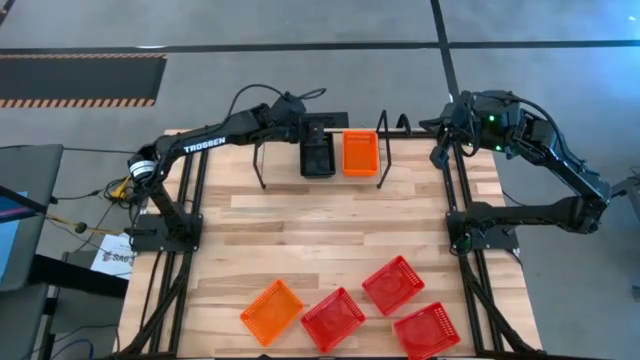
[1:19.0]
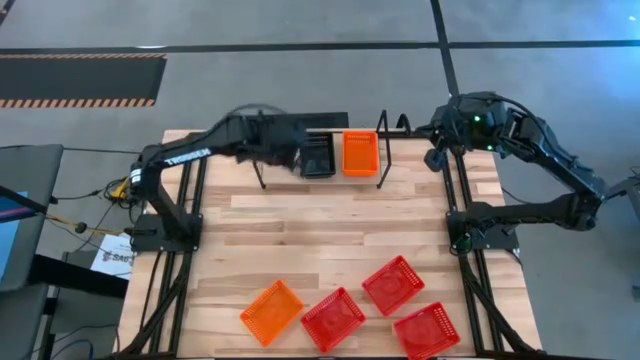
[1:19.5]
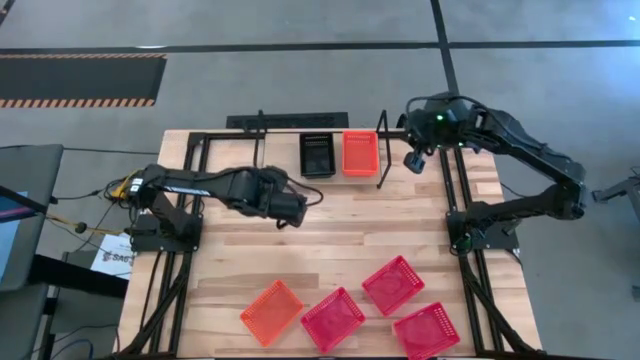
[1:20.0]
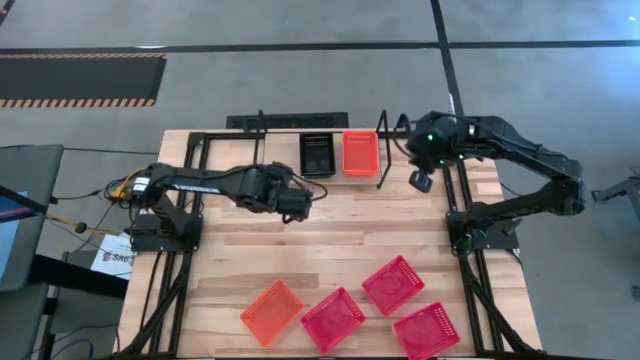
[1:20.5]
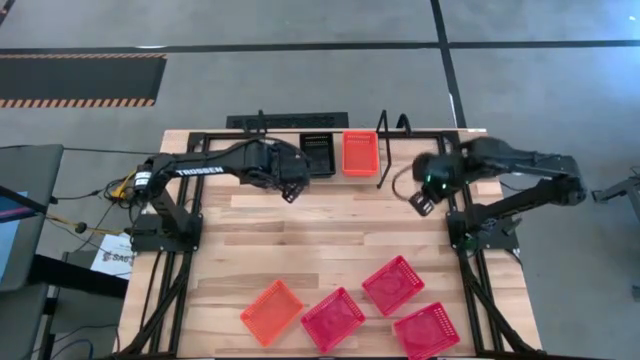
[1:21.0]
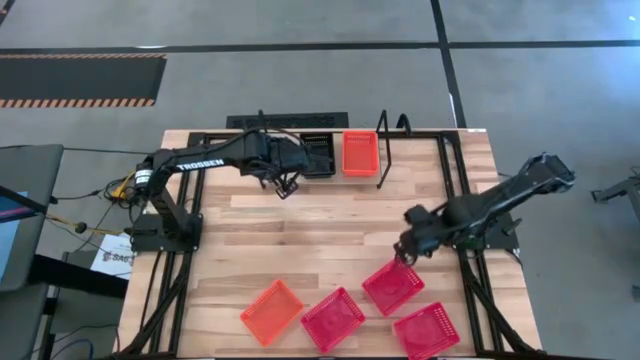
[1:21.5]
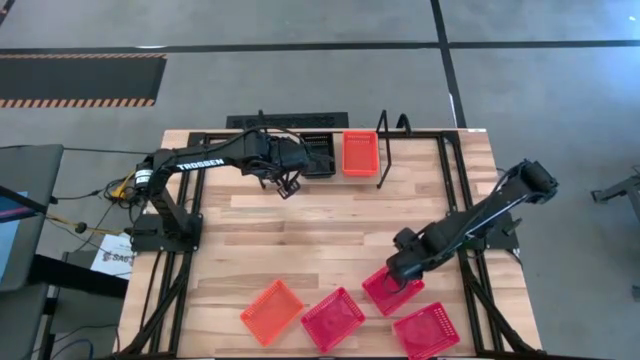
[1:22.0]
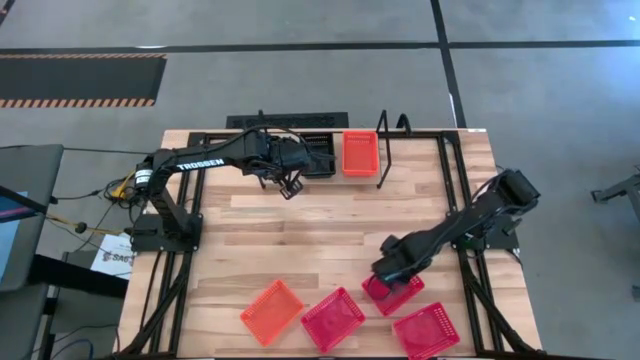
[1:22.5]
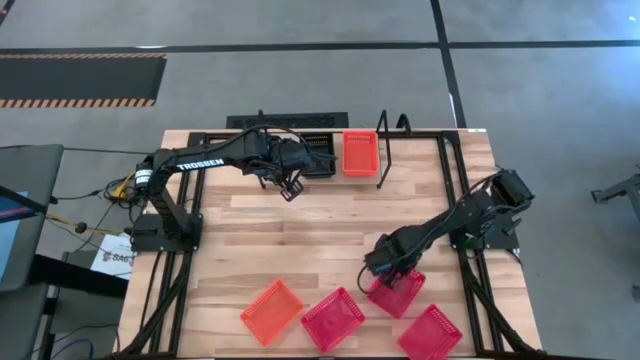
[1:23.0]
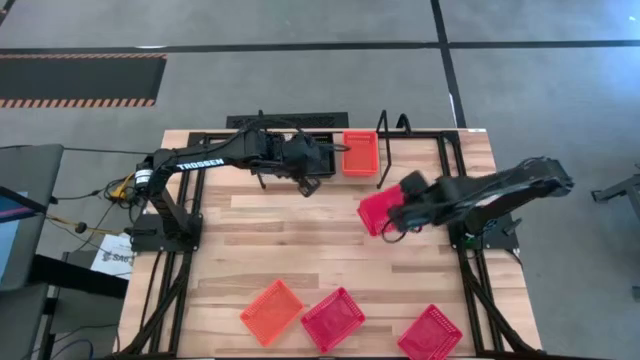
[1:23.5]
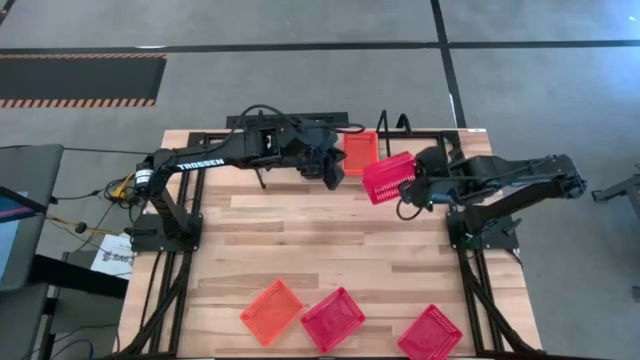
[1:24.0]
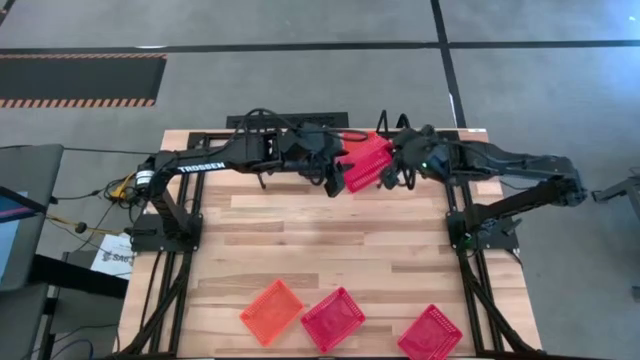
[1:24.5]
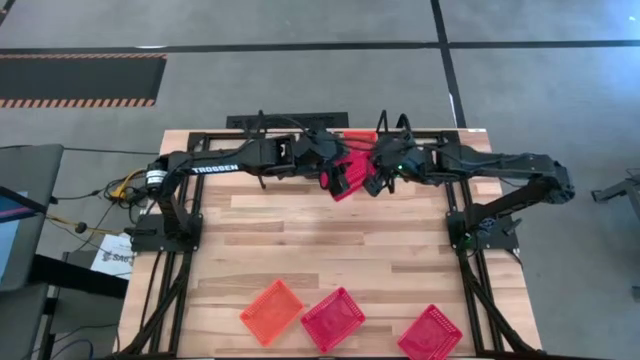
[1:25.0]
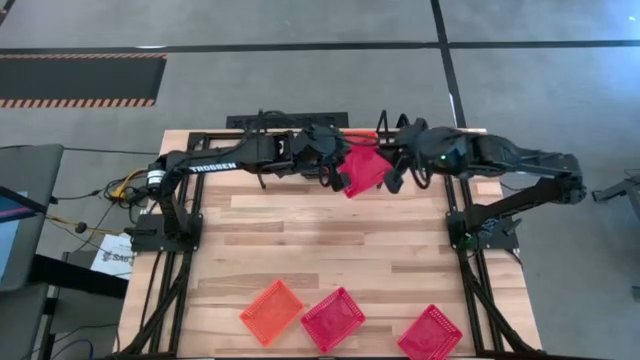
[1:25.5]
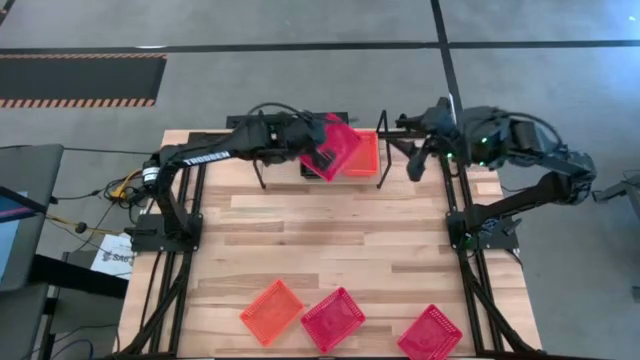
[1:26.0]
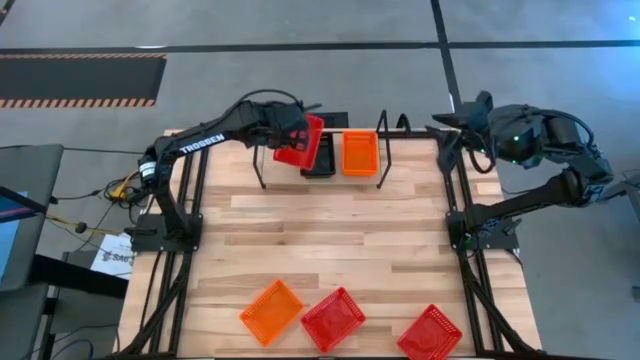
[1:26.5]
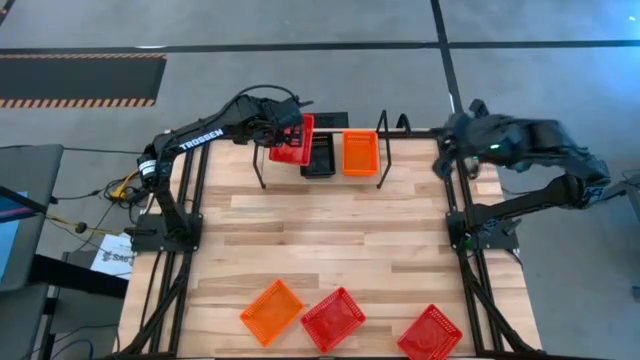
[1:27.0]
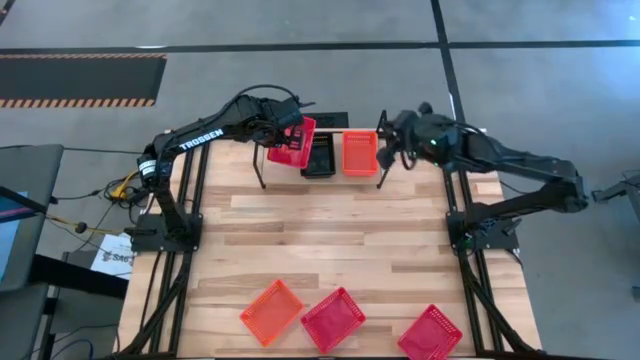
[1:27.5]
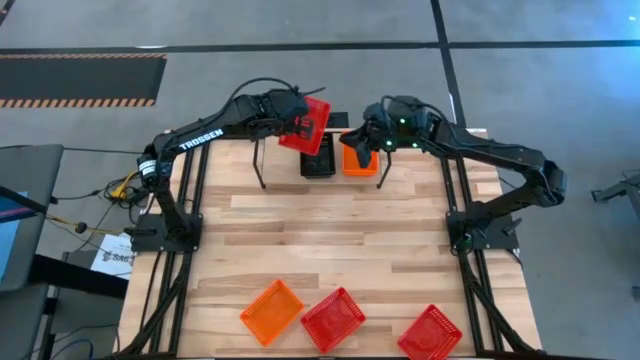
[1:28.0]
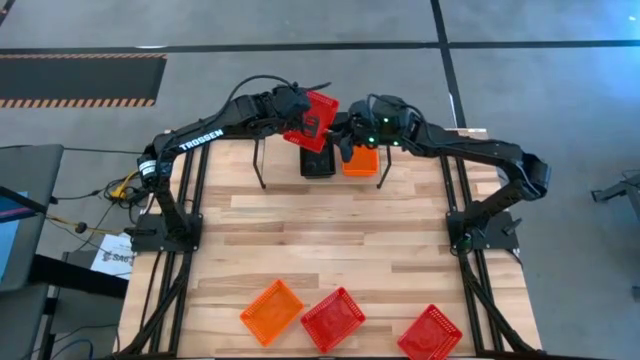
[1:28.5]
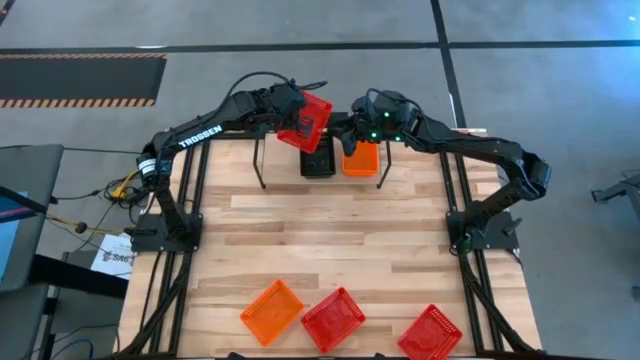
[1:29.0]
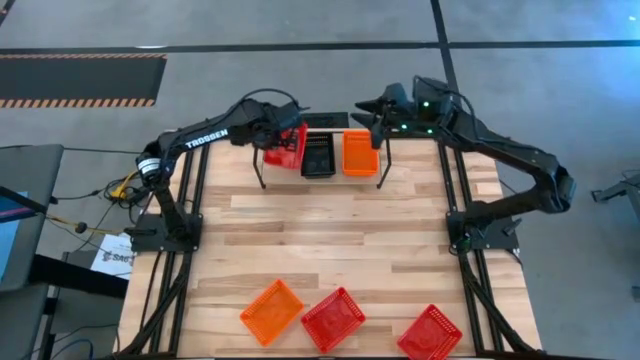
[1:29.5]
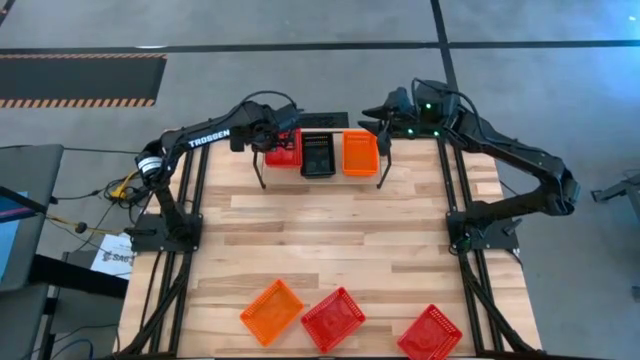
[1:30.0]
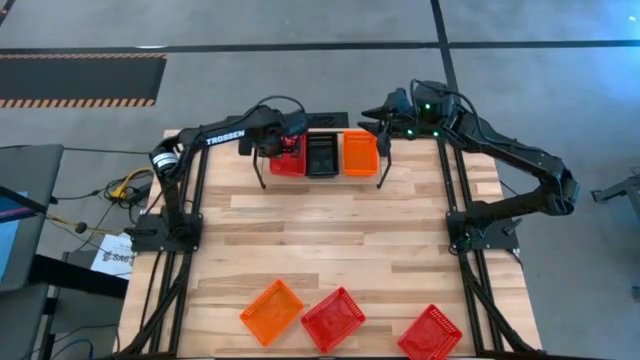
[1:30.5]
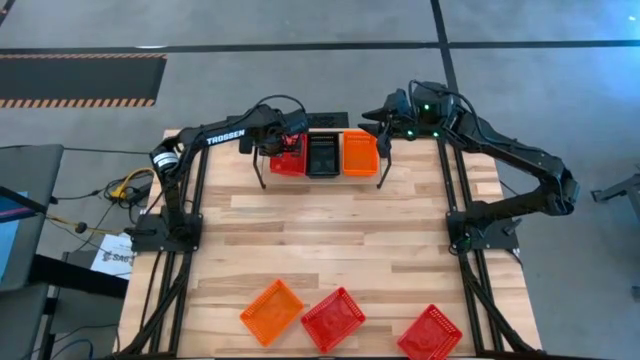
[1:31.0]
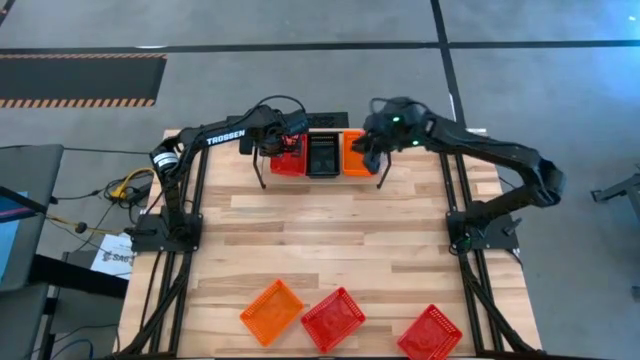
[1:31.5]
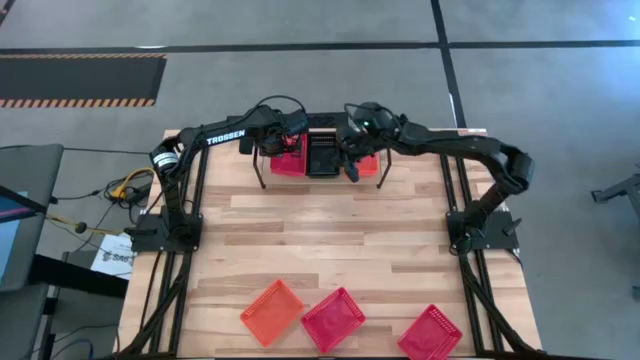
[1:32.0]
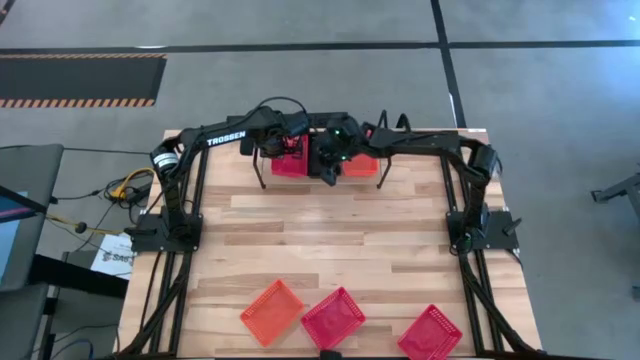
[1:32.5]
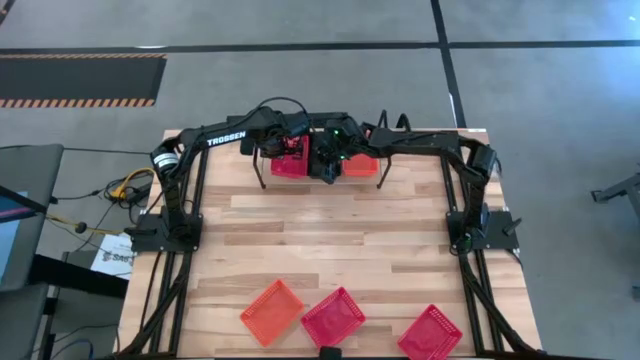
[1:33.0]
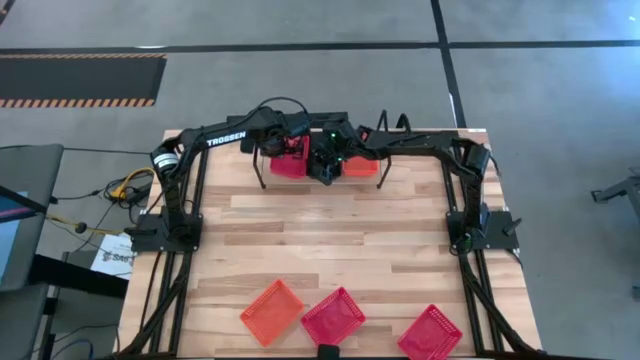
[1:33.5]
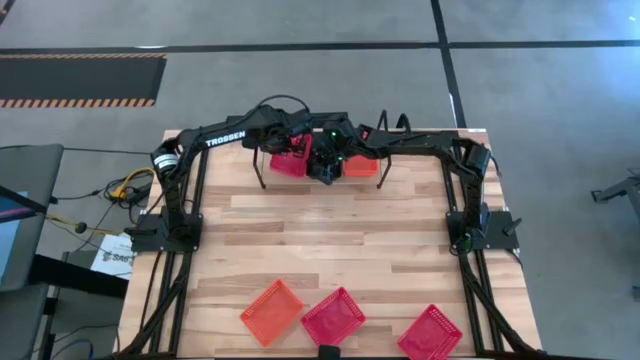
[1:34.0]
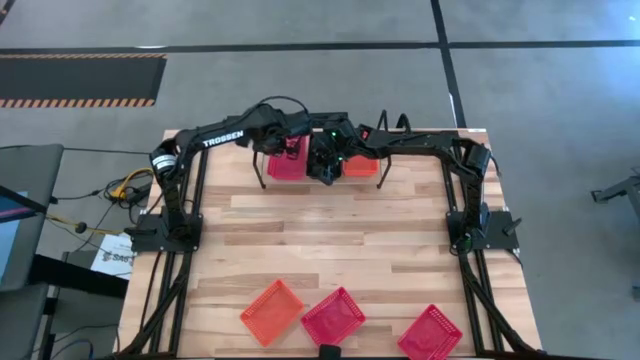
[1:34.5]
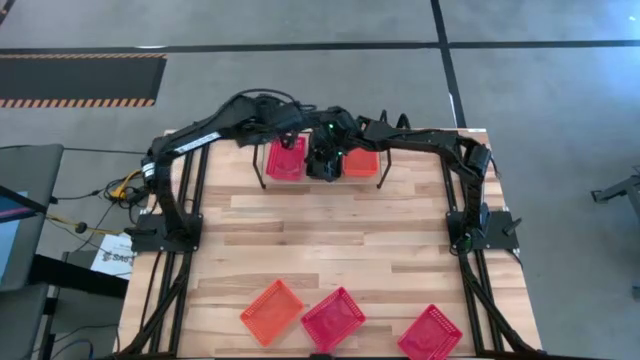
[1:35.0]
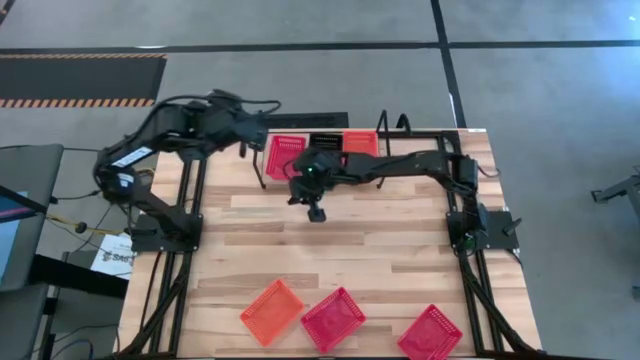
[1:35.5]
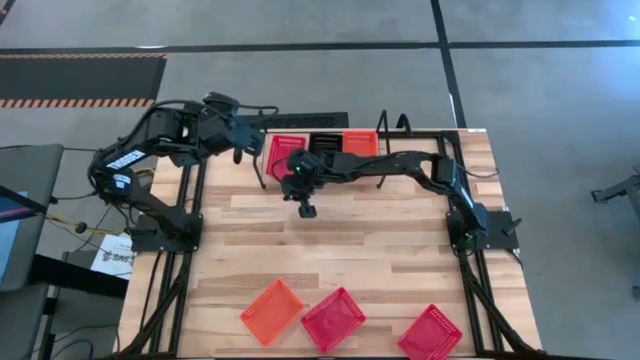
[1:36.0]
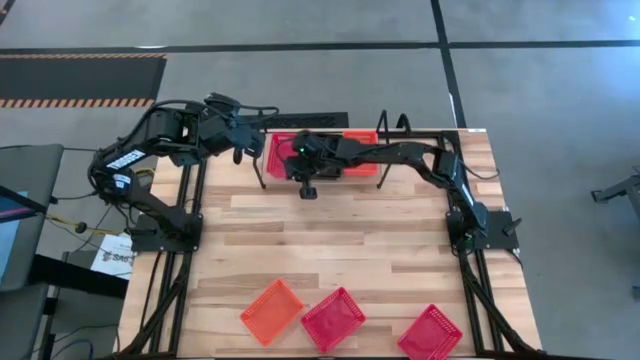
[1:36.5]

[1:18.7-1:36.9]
Task: Stack baskets on shelf by color
Put the top red bin on the shelf

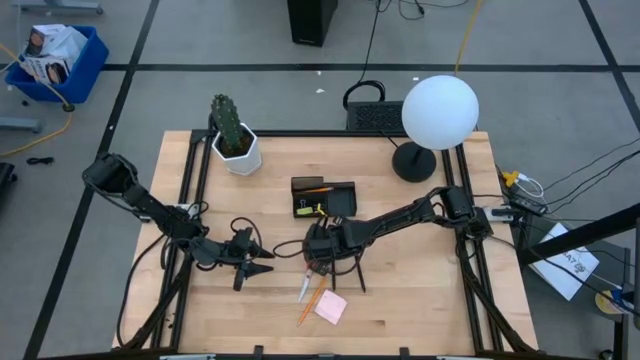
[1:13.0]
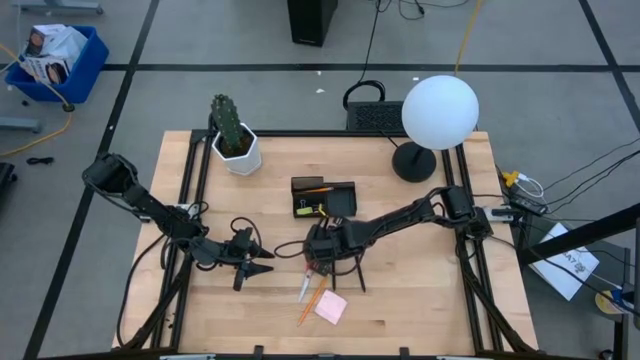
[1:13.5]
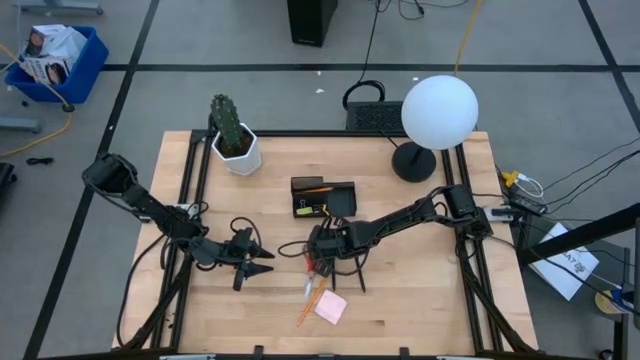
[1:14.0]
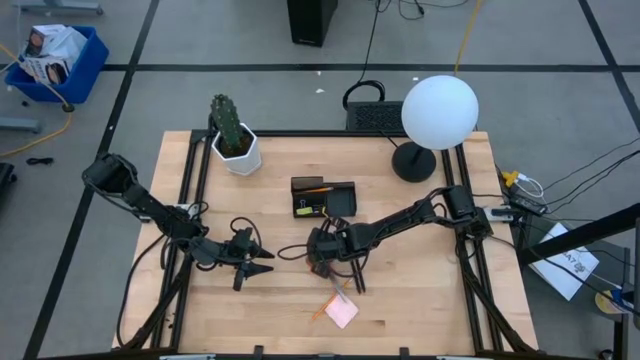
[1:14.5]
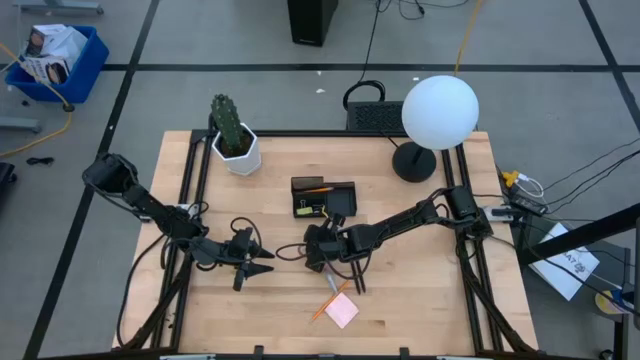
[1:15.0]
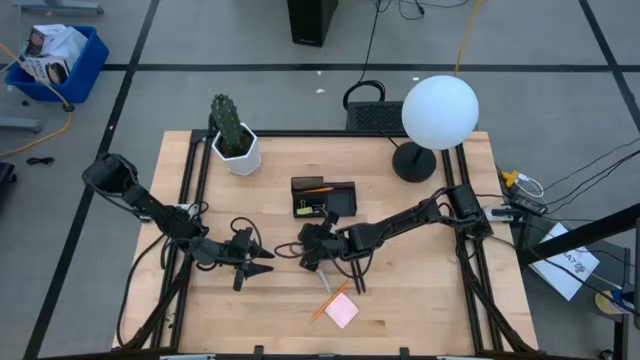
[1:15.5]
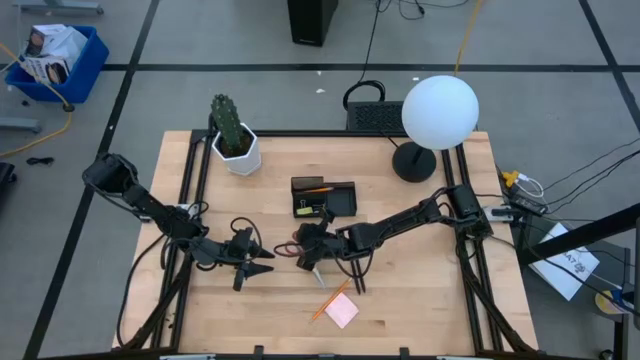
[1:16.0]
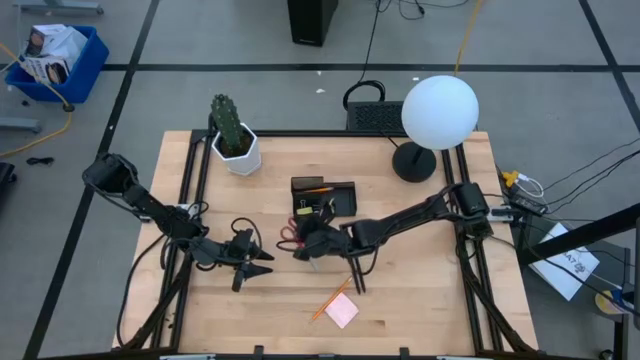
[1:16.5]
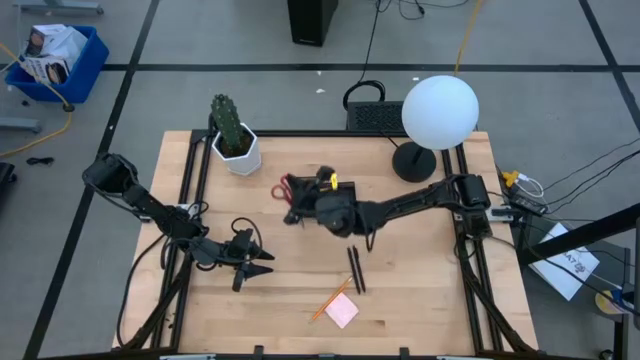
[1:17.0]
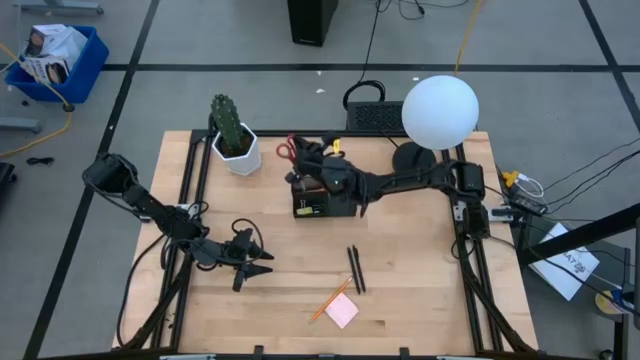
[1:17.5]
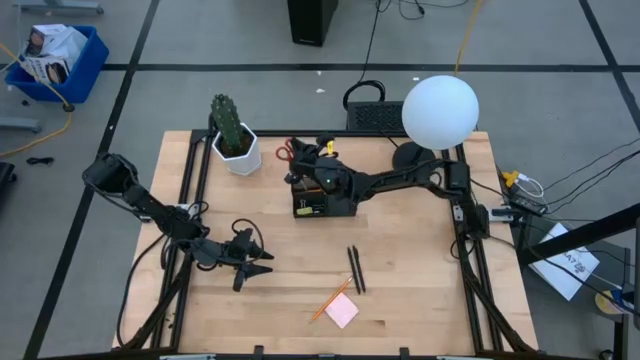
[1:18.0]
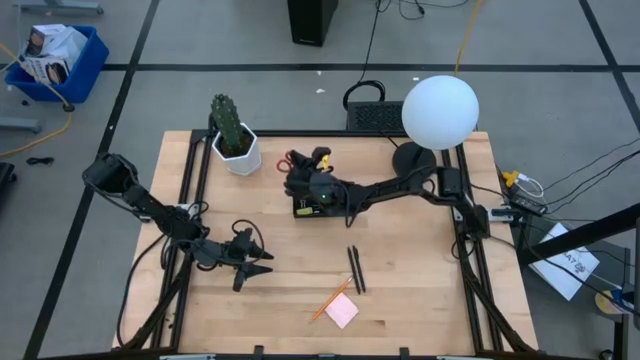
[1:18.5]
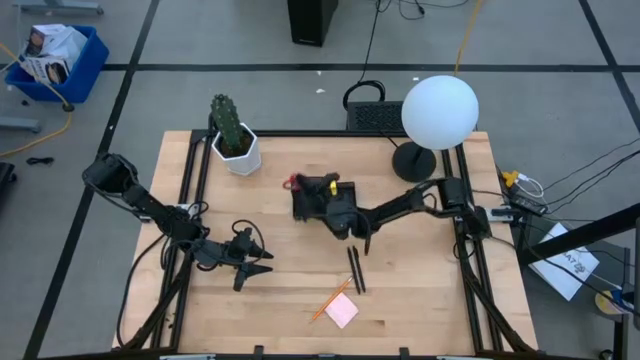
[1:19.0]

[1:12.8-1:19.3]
Task: Pick and place office supplies into organizer
Put the red scissors into the top left of the desk organizer
